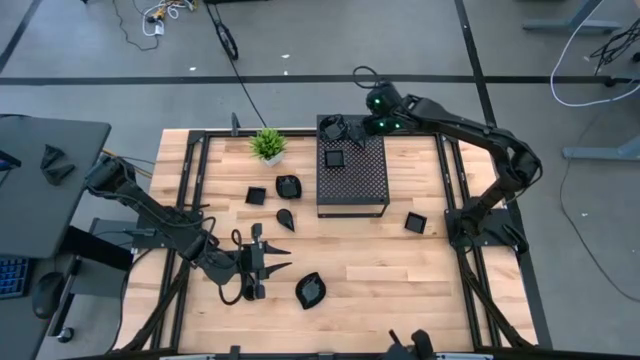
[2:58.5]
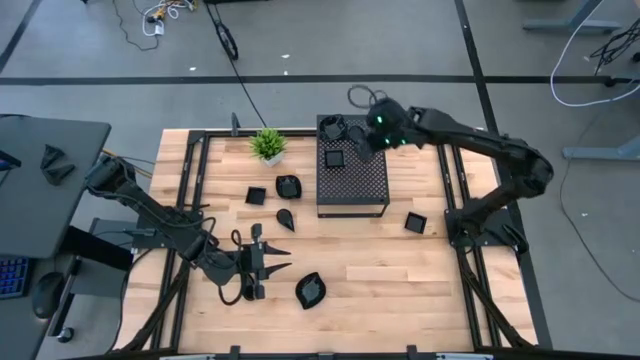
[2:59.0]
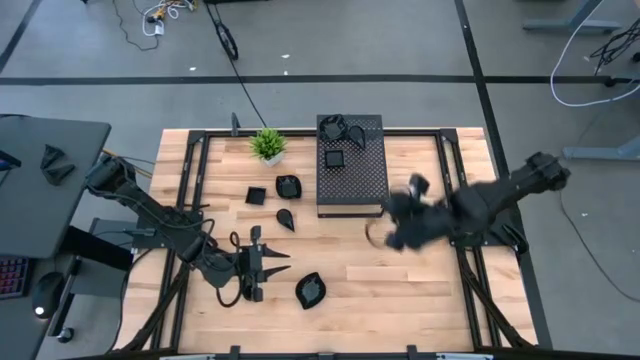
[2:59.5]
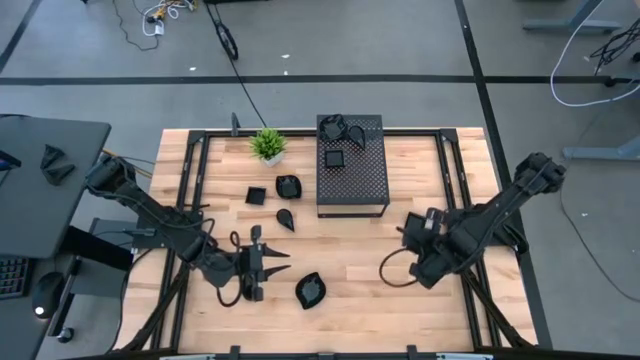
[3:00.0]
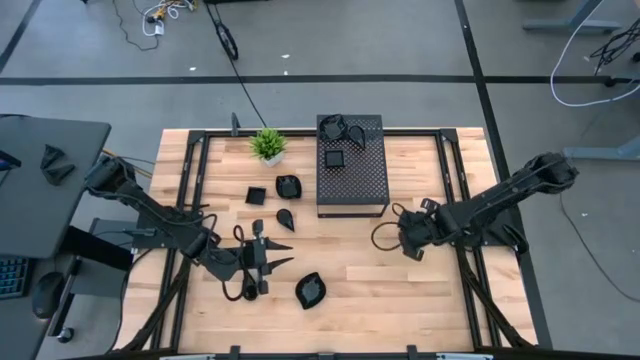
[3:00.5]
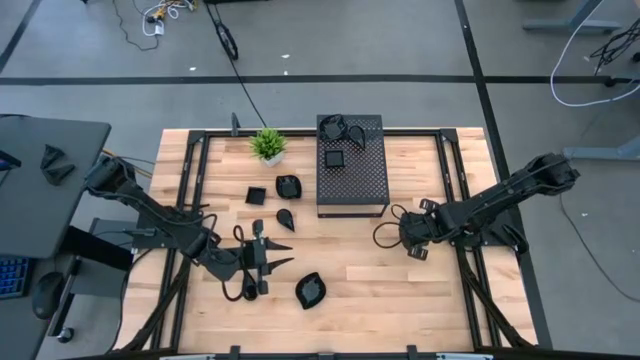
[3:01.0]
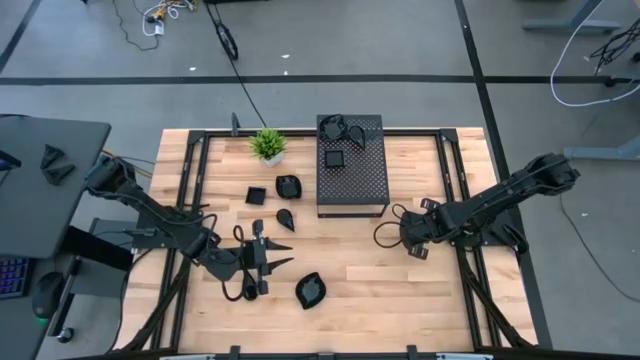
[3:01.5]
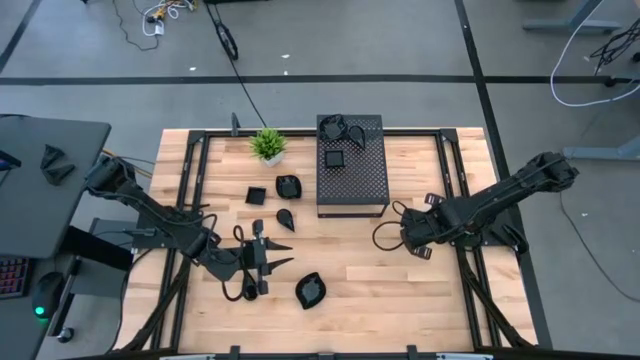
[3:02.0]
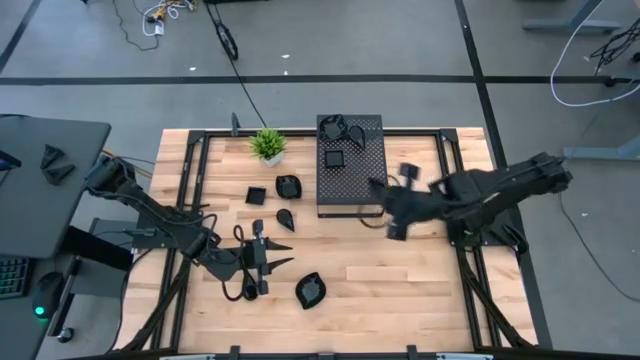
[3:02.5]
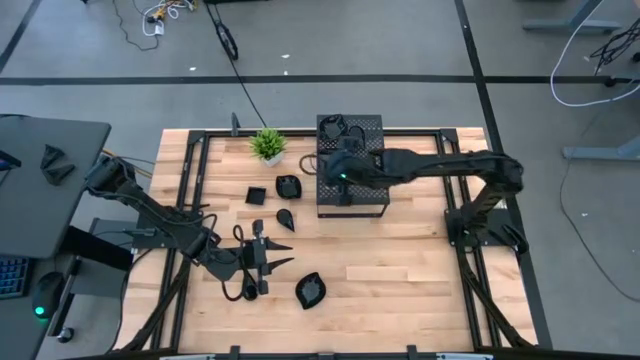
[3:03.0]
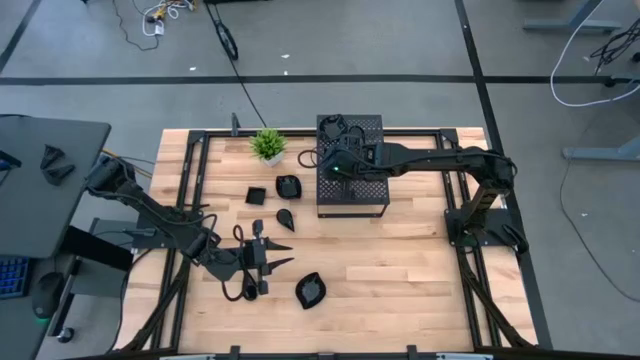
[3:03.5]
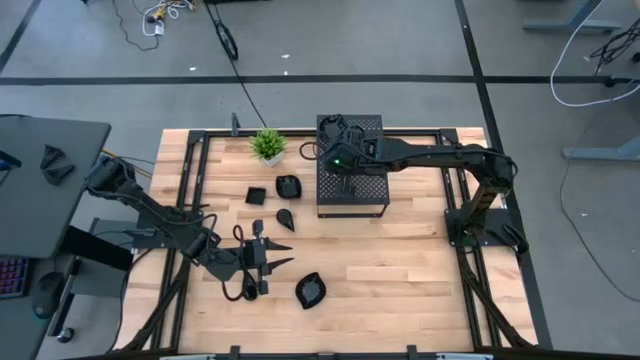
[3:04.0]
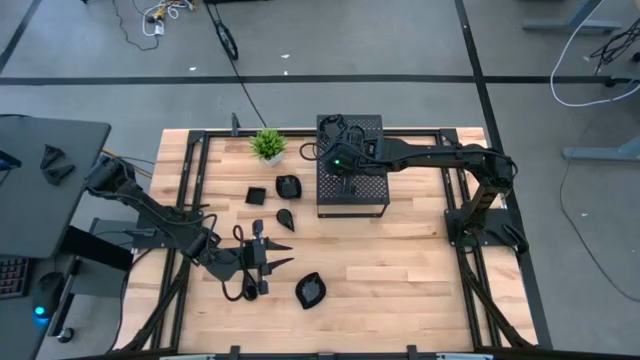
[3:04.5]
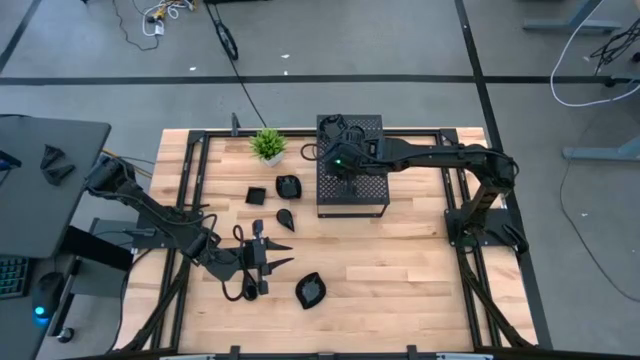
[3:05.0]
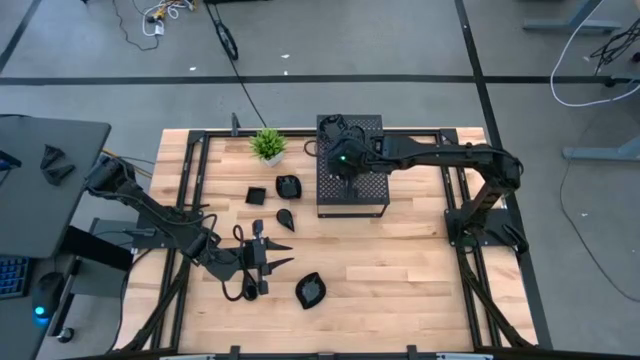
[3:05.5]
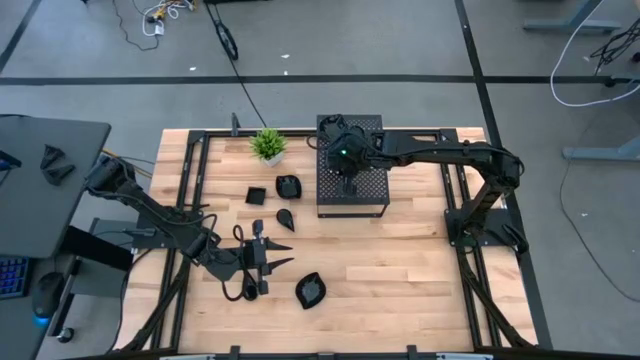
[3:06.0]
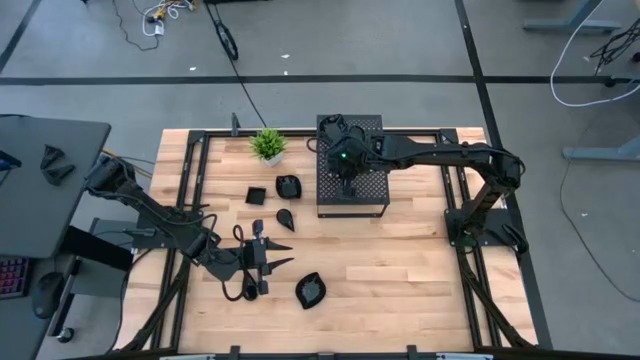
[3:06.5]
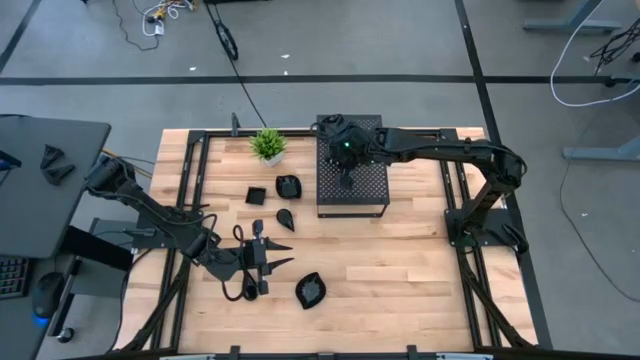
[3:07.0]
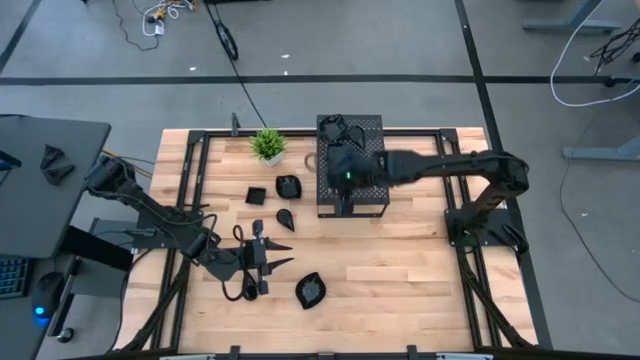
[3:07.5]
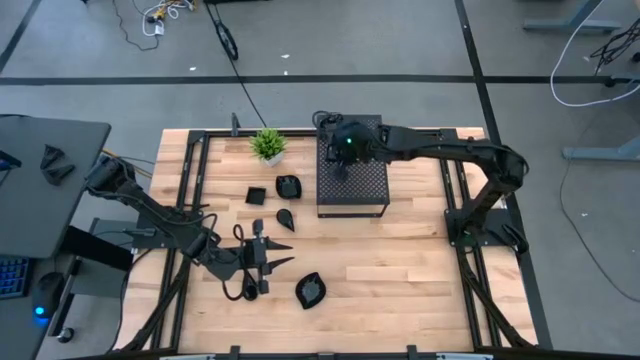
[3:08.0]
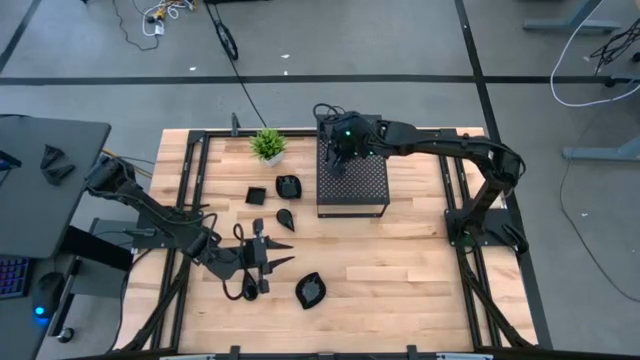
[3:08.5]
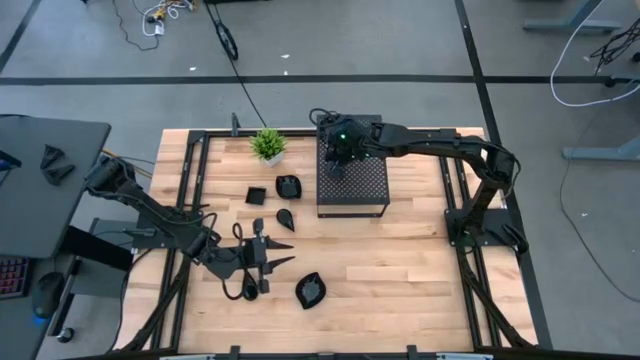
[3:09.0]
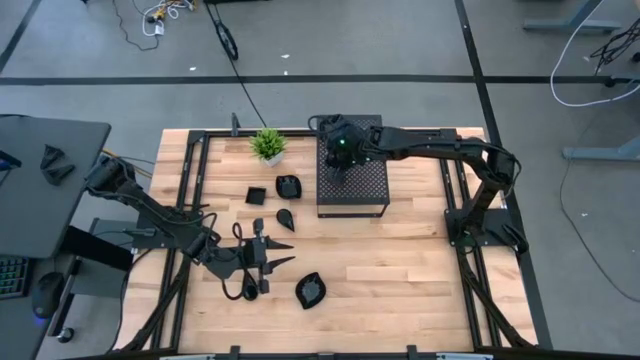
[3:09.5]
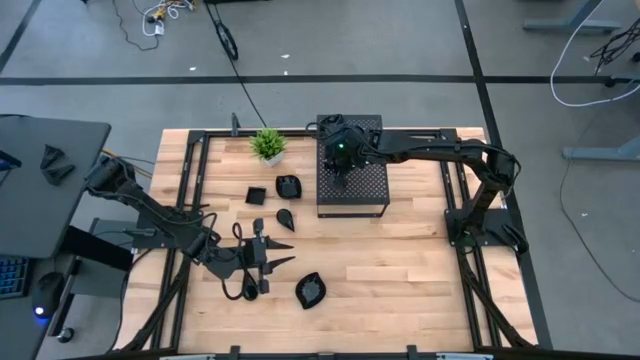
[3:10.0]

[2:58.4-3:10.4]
Task: Pick & Place Mini shaped plates
Stack the right square plate on top of the square plates on the shelf

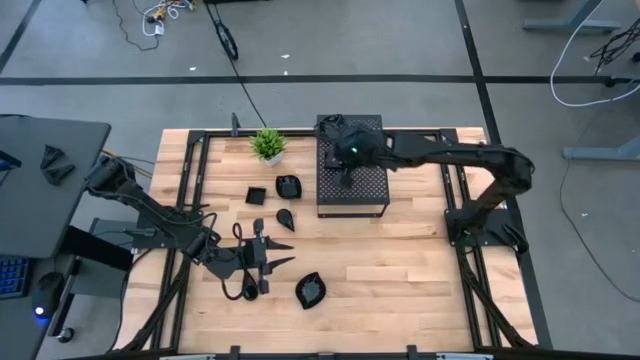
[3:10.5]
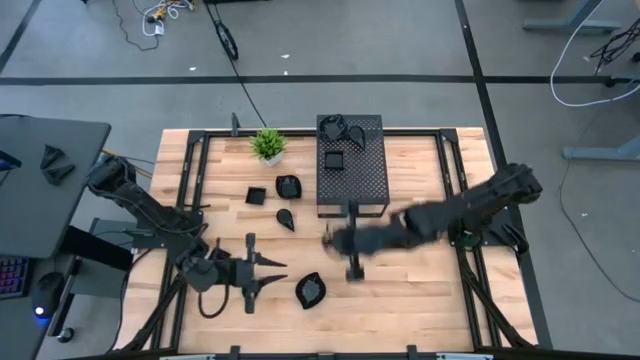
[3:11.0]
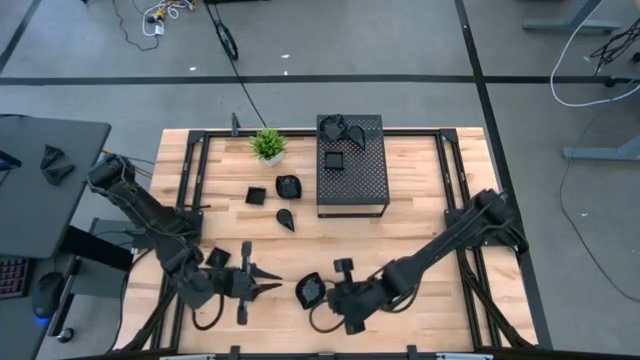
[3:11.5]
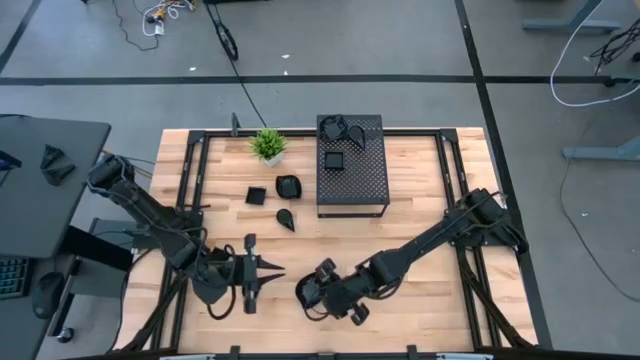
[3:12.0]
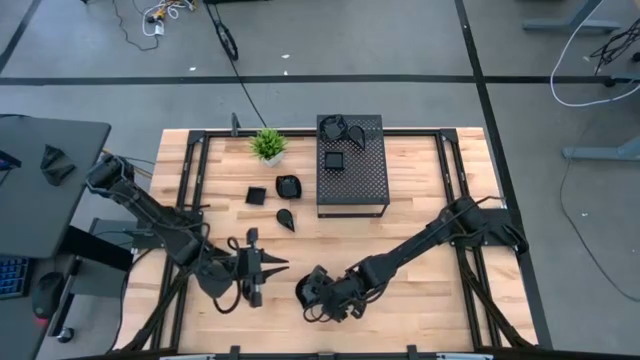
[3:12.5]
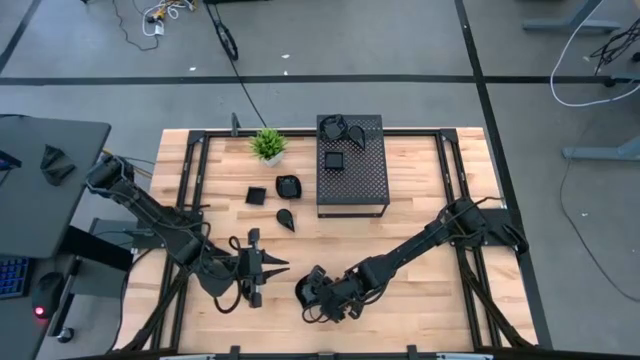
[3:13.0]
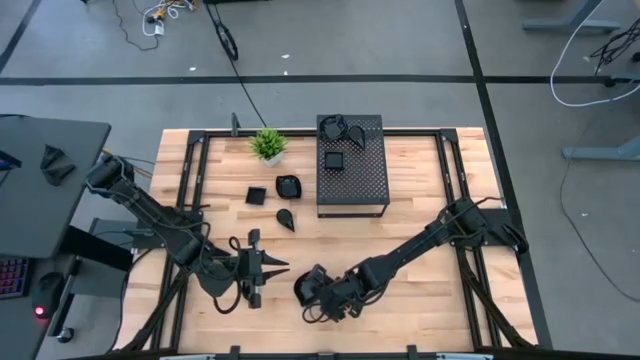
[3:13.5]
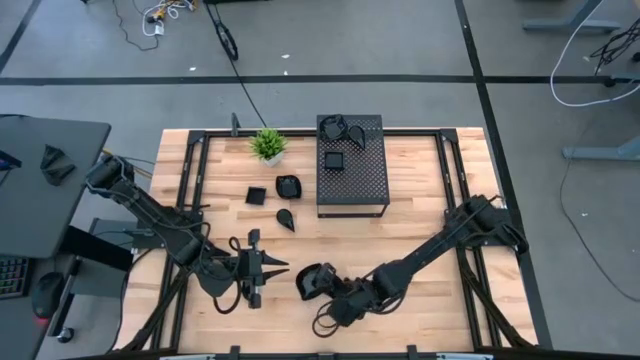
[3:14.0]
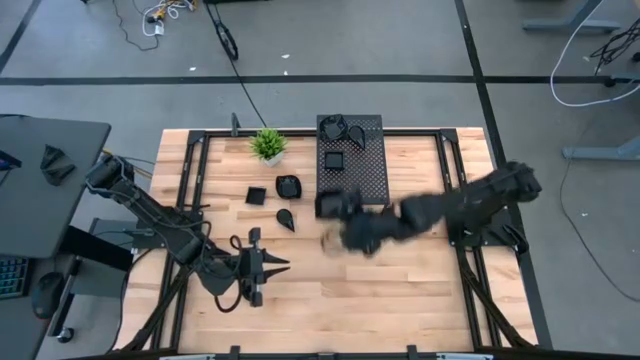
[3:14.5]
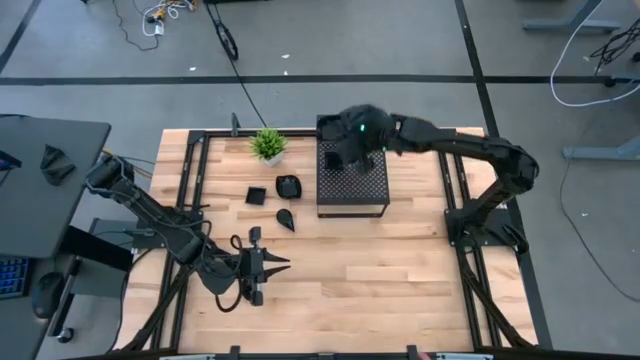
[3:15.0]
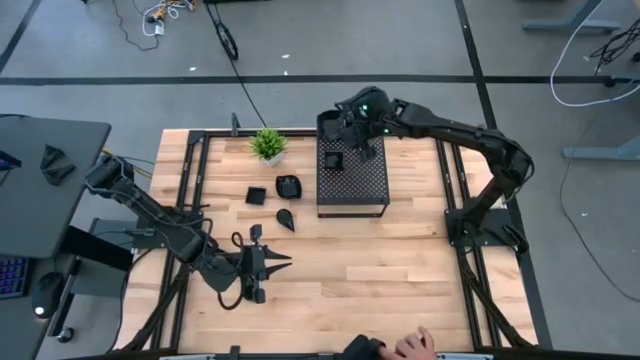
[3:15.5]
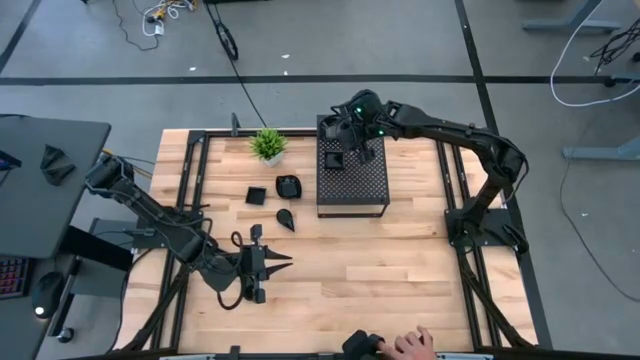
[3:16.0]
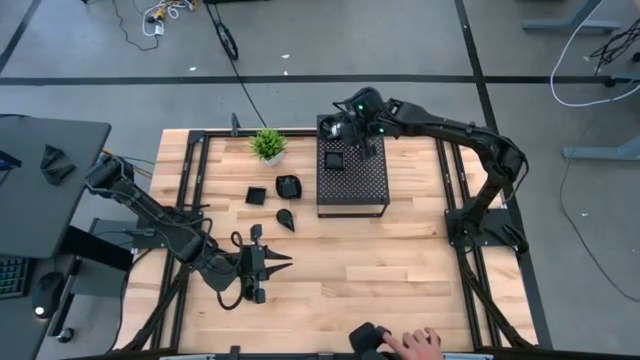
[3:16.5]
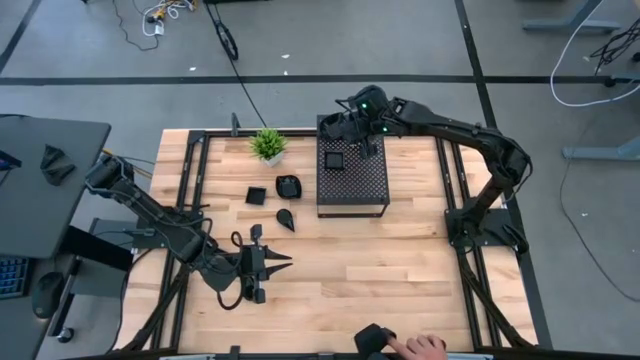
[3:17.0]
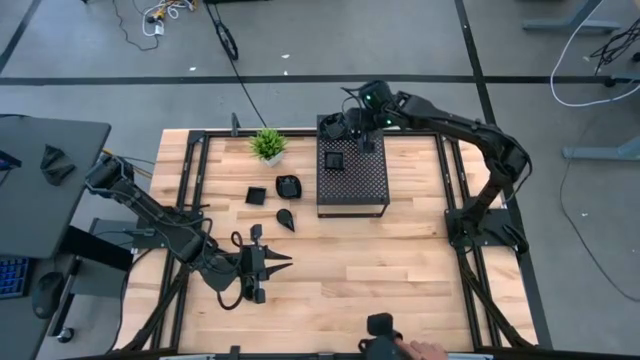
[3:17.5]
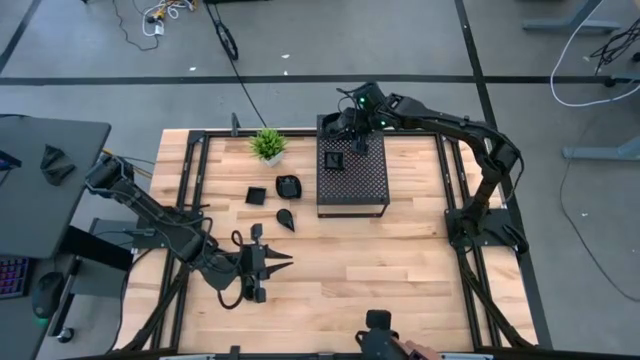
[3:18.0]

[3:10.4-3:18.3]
Stack the bottom leaf shaped plate on top of the leaf shaped plates on the shelf

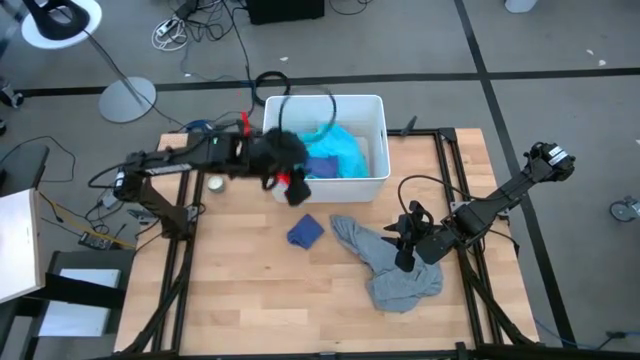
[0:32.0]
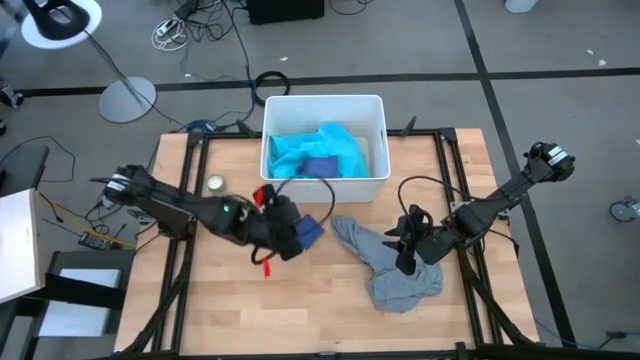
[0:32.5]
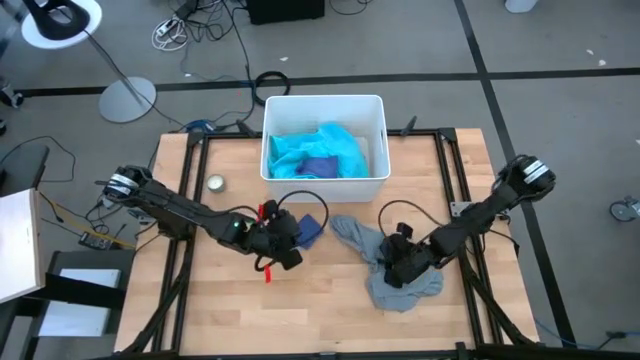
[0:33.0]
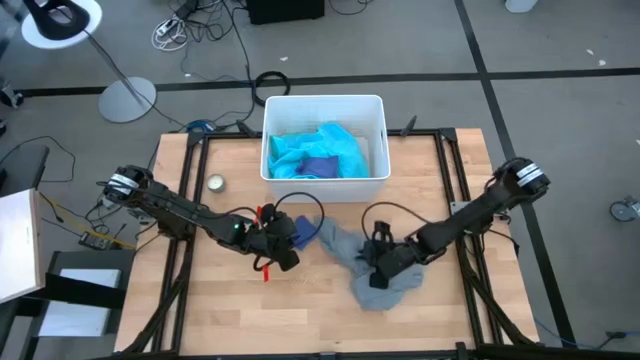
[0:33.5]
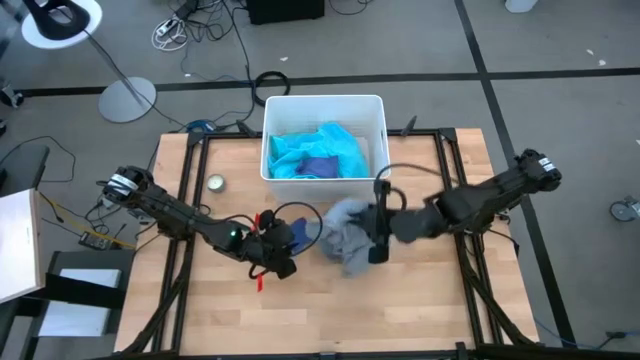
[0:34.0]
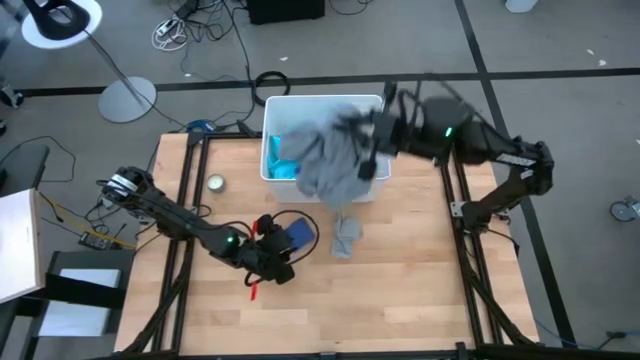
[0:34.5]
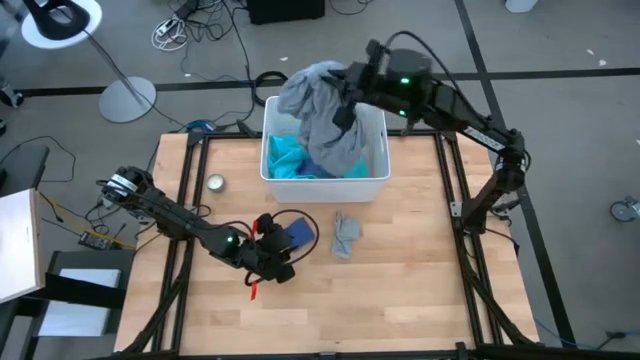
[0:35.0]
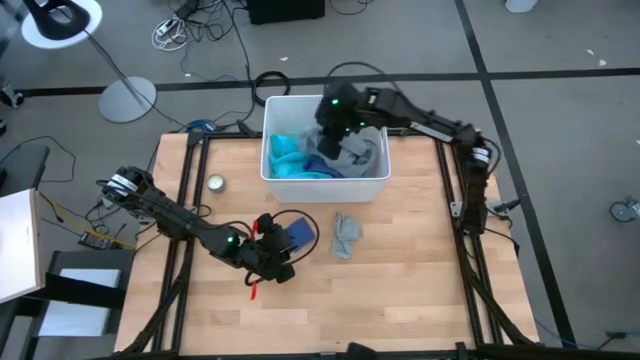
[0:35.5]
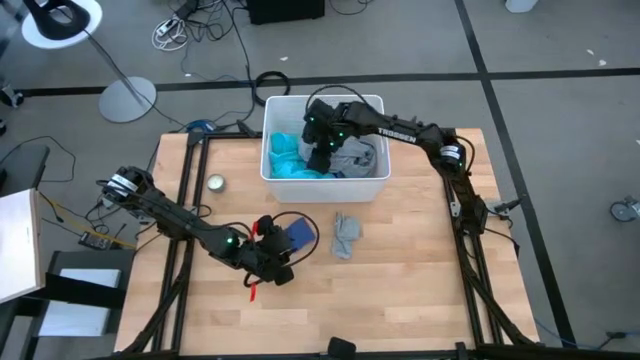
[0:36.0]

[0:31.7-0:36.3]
Task: Sort clothes
Put the gray shirt into the laundry bin
